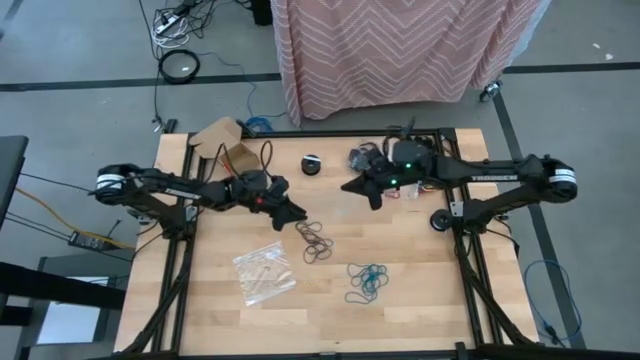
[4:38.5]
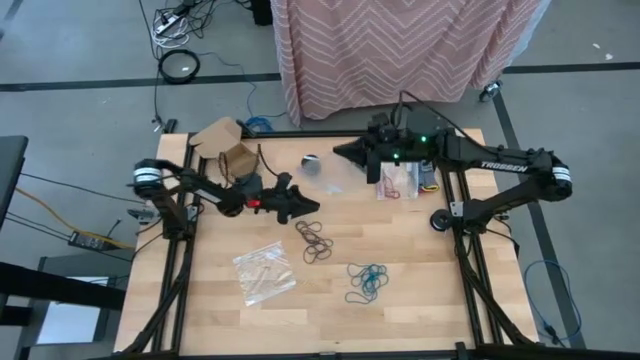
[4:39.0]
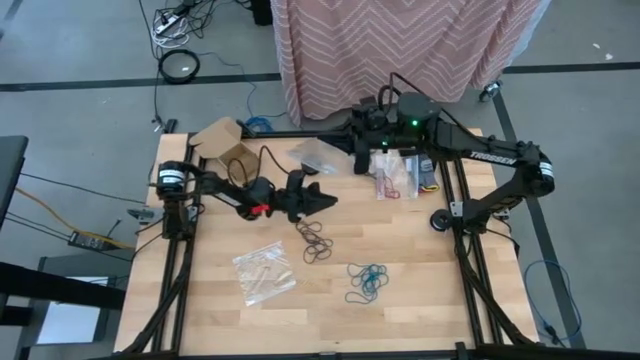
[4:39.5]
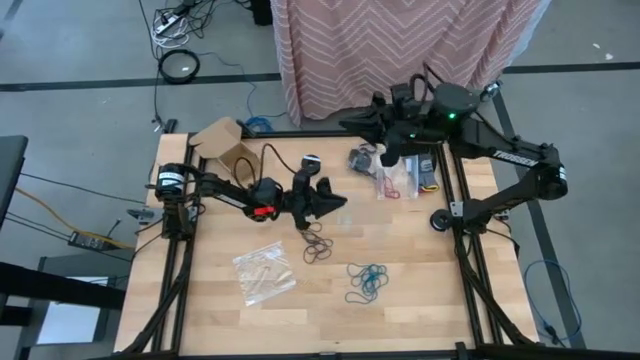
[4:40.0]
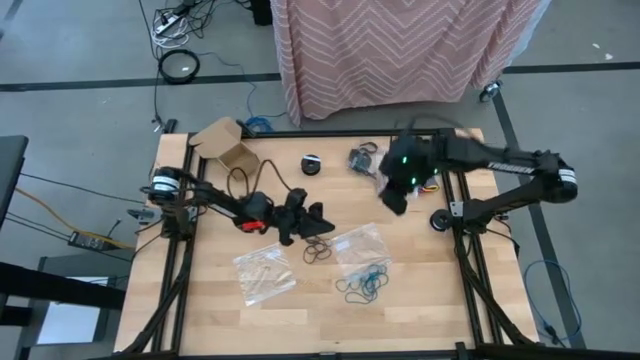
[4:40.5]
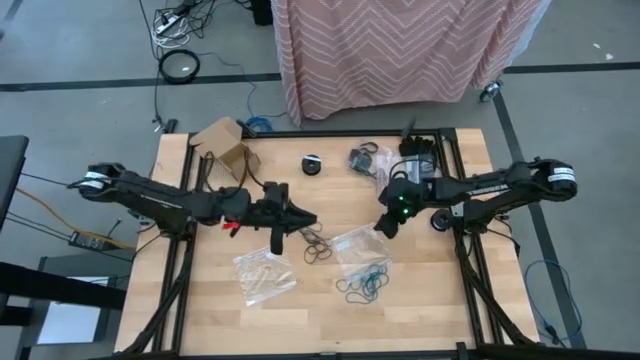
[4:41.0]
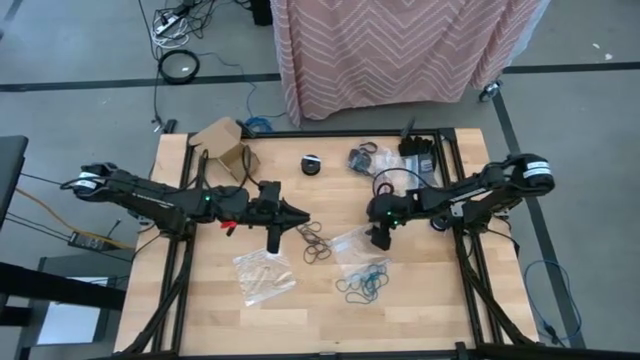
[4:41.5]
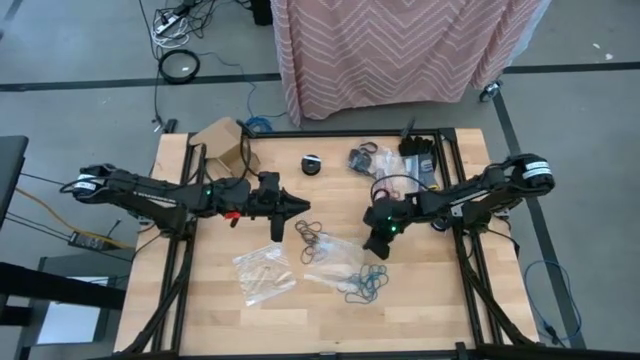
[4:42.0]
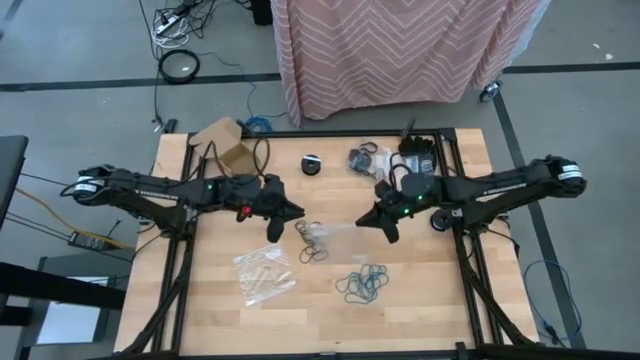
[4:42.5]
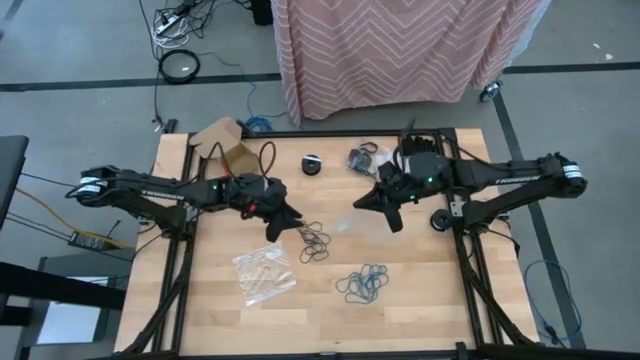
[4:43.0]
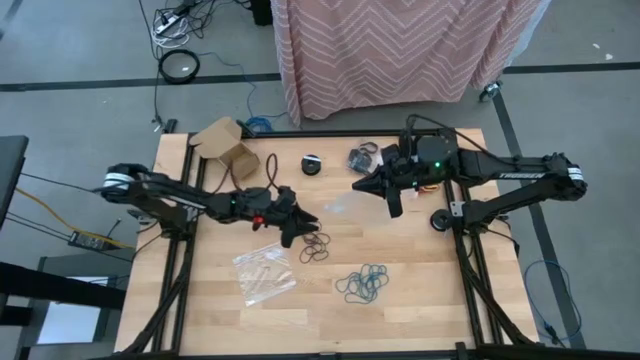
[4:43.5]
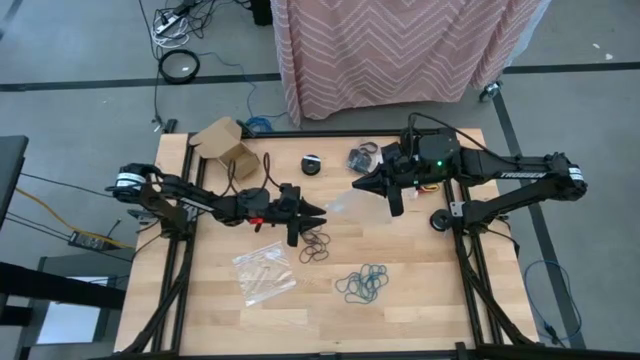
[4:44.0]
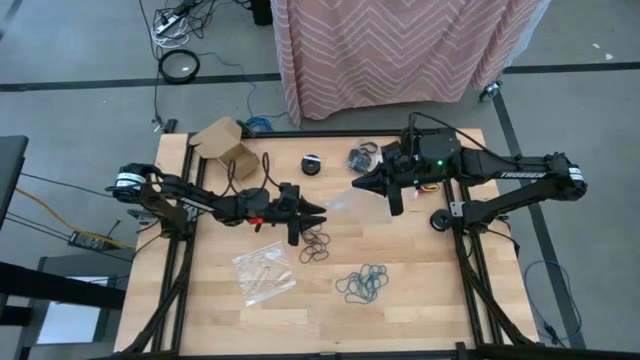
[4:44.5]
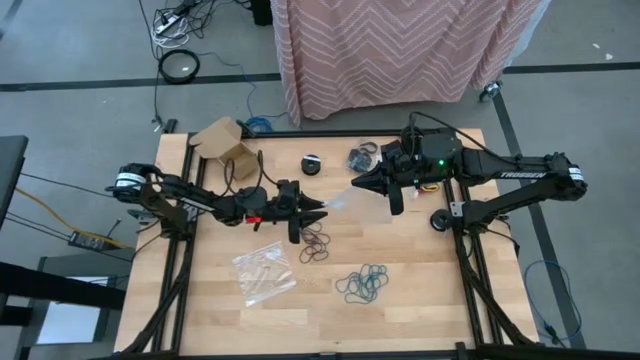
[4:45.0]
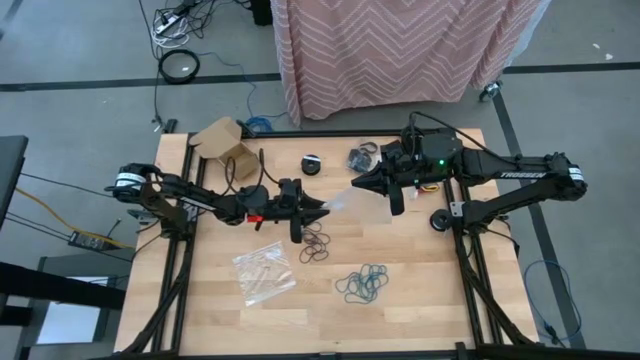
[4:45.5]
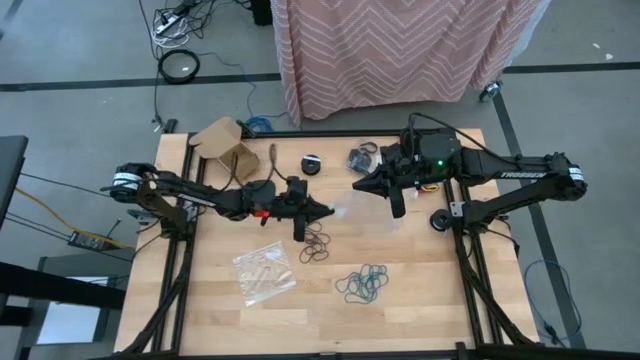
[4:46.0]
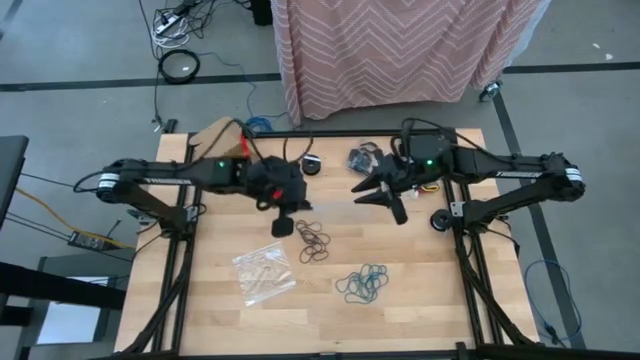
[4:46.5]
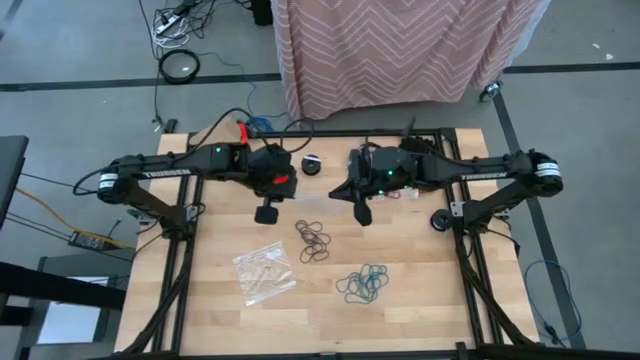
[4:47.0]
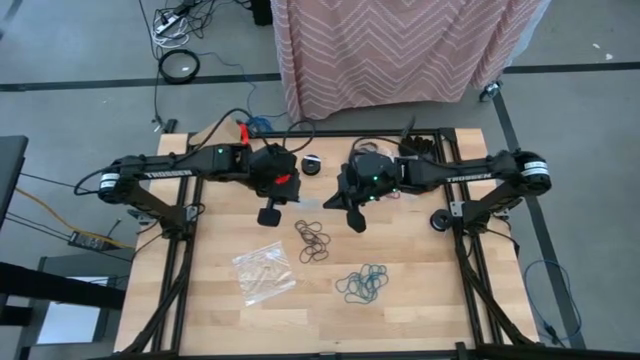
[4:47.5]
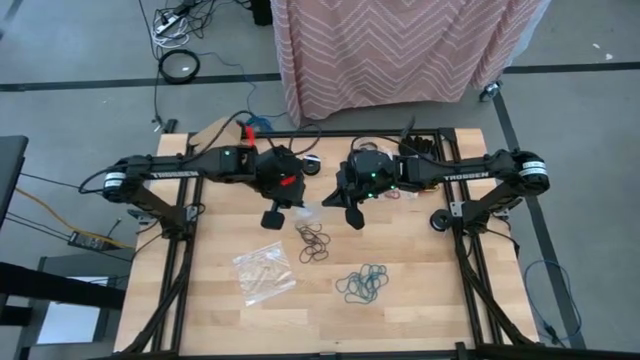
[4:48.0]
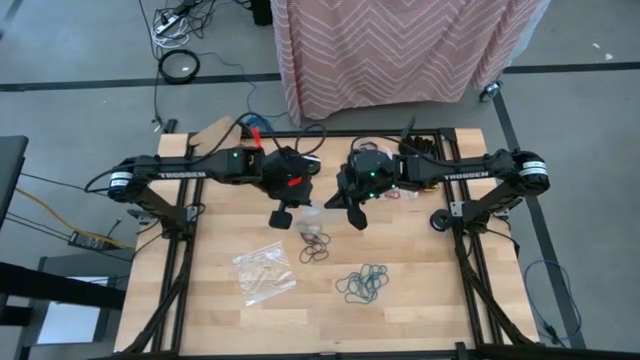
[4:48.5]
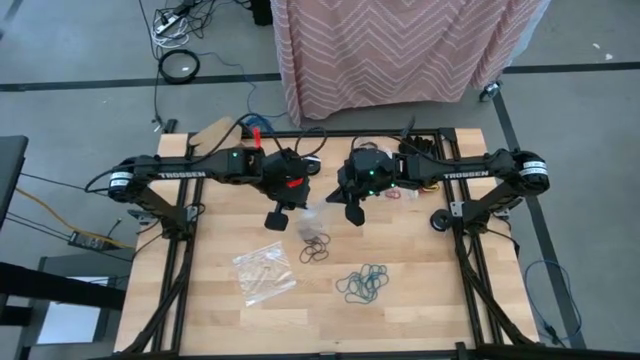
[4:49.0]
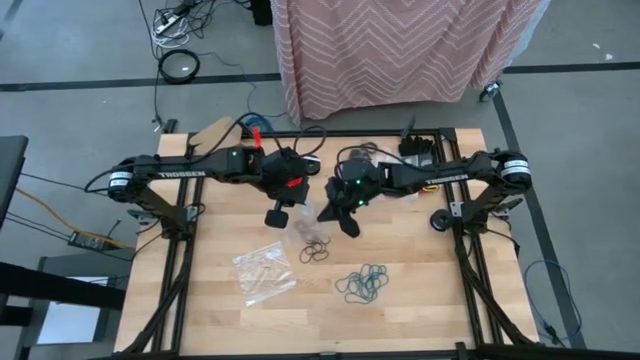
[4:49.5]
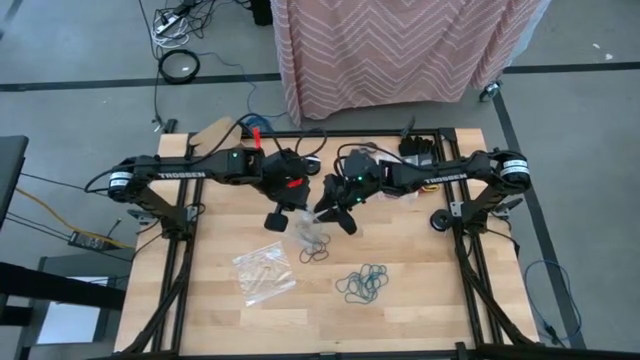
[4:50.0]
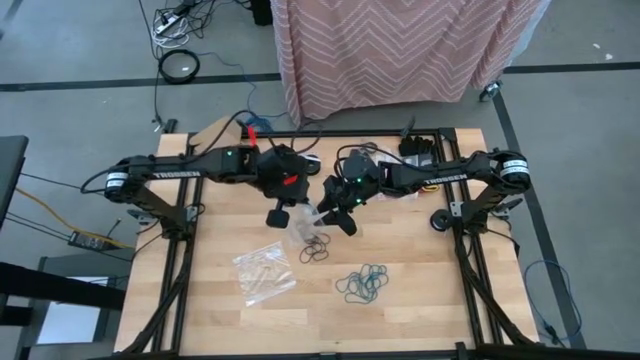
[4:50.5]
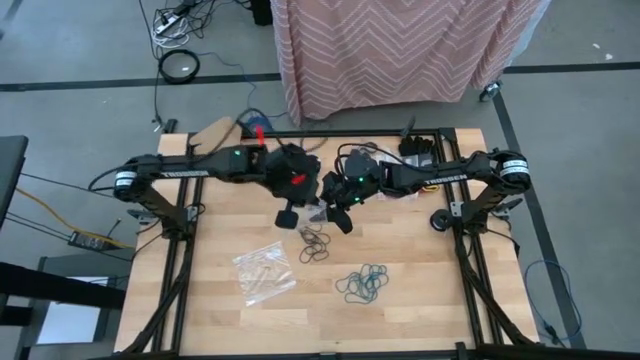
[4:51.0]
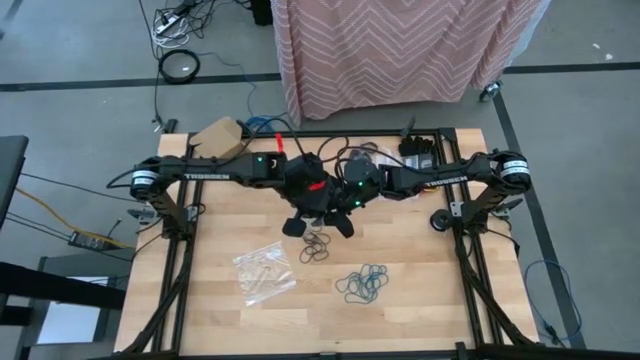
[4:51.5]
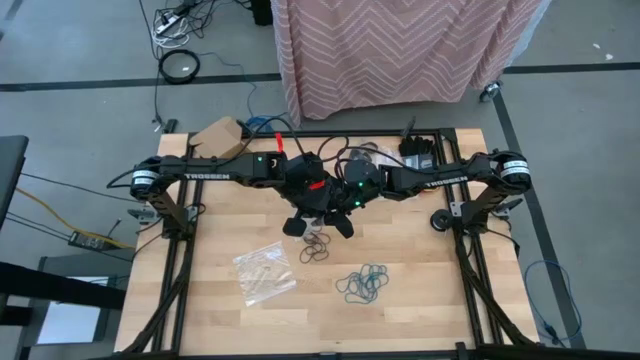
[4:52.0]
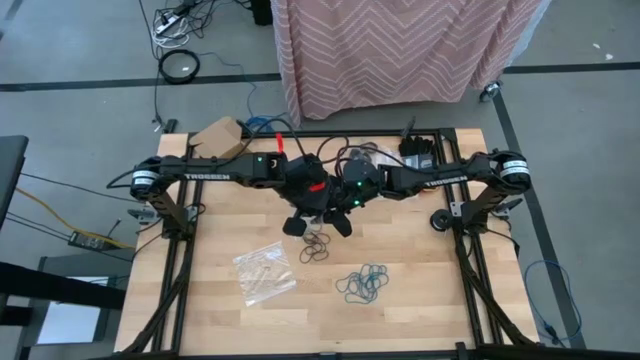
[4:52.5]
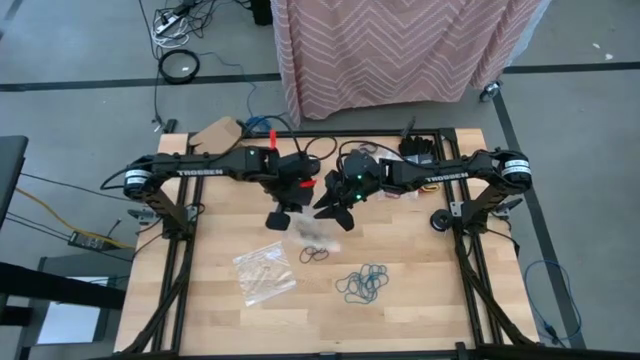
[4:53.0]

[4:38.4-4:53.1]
Task: Sort rubber bands
Open the transparent zip bag

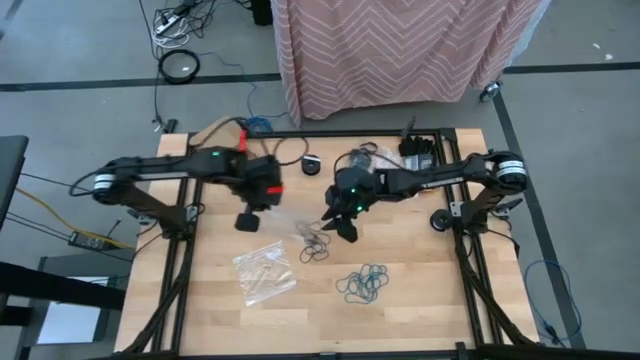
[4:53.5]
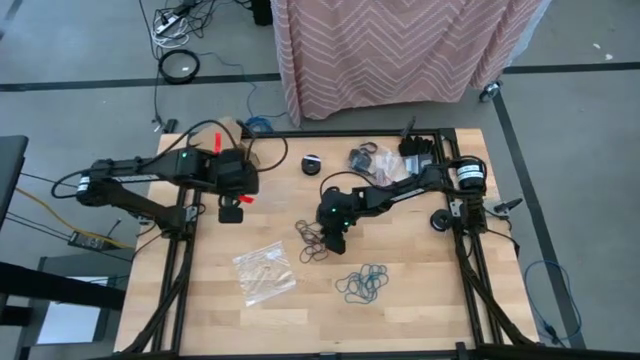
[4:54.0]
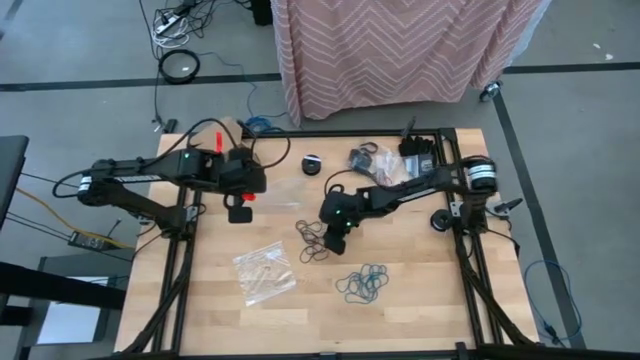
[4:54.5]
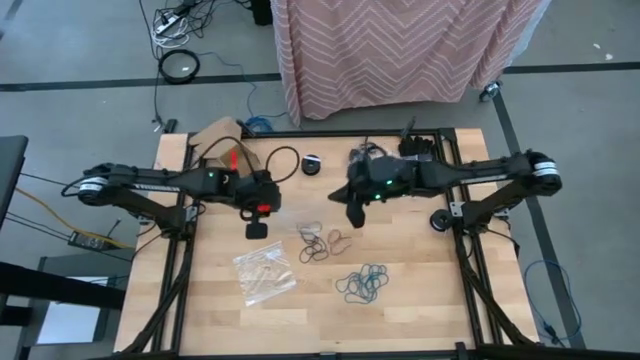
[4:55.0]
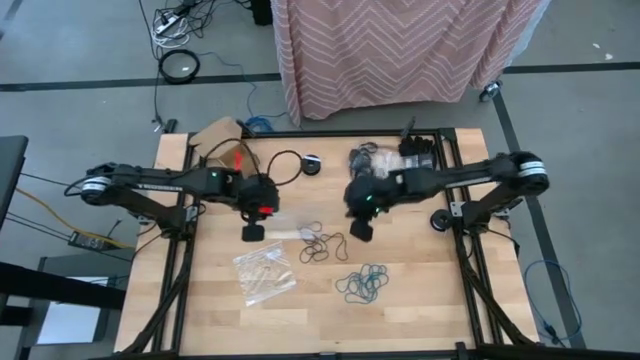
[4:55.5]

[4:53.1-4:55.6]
Put the violet rubber band into the transparent bag

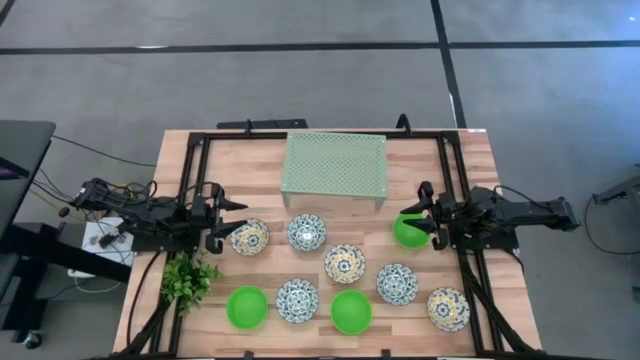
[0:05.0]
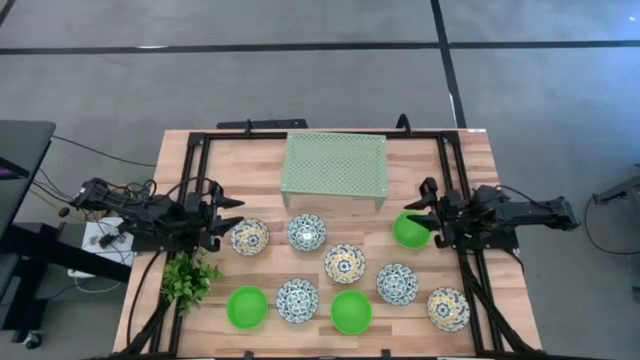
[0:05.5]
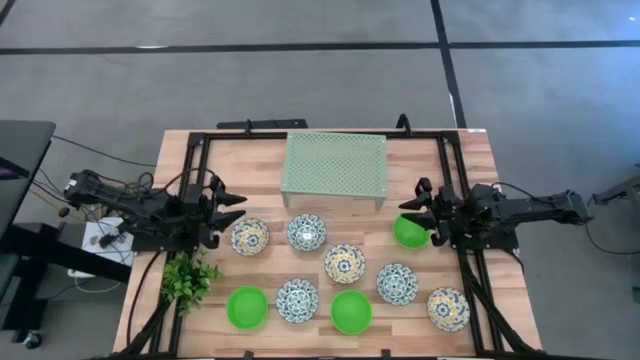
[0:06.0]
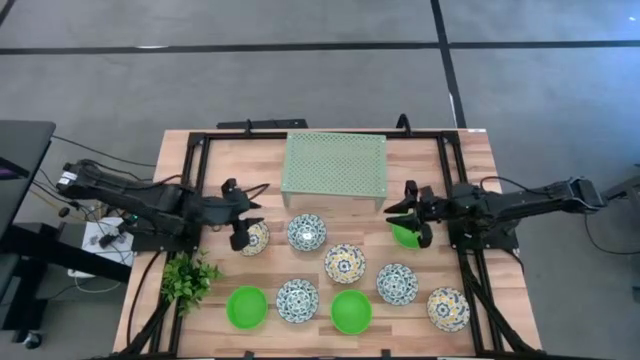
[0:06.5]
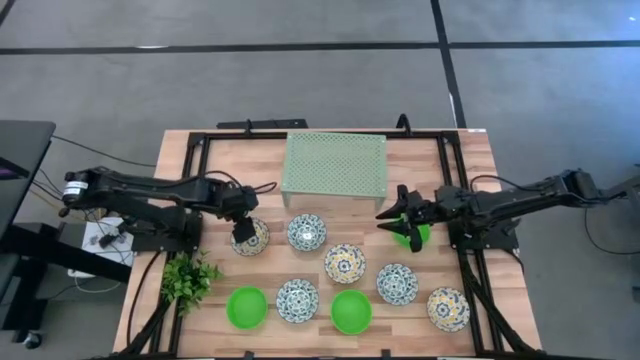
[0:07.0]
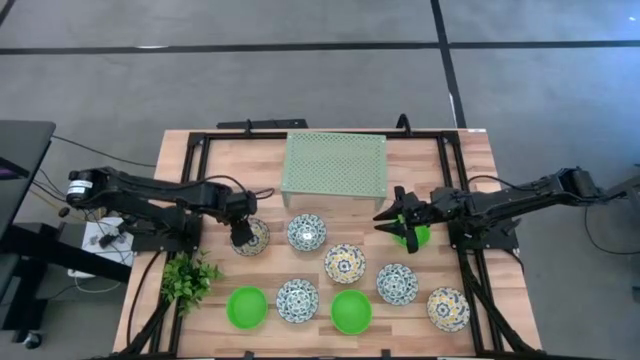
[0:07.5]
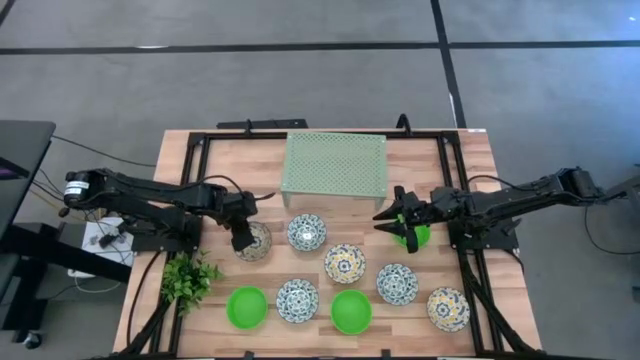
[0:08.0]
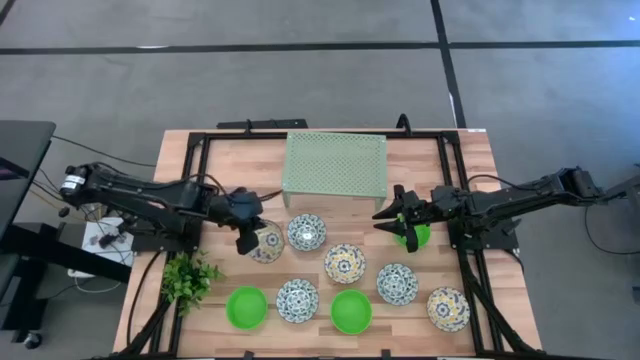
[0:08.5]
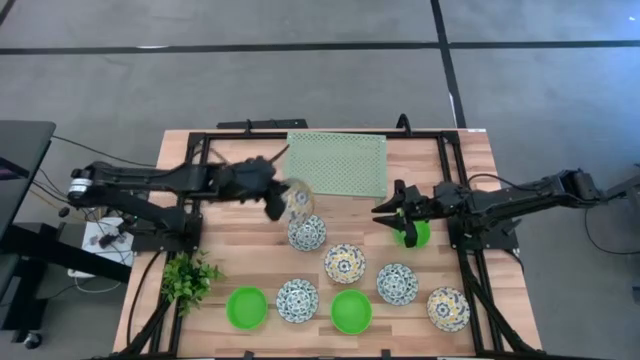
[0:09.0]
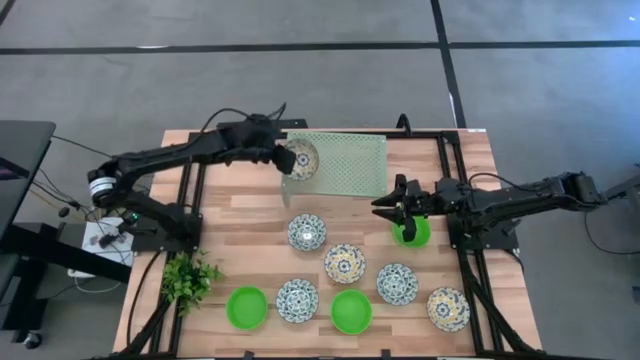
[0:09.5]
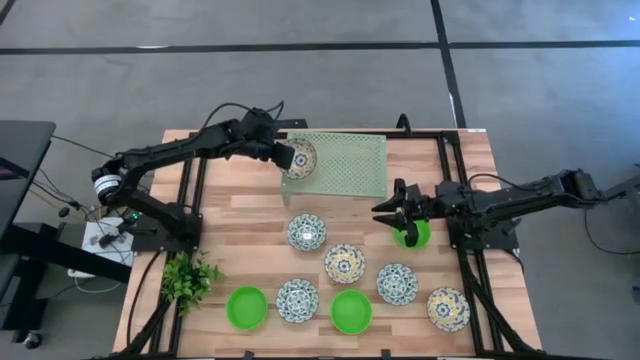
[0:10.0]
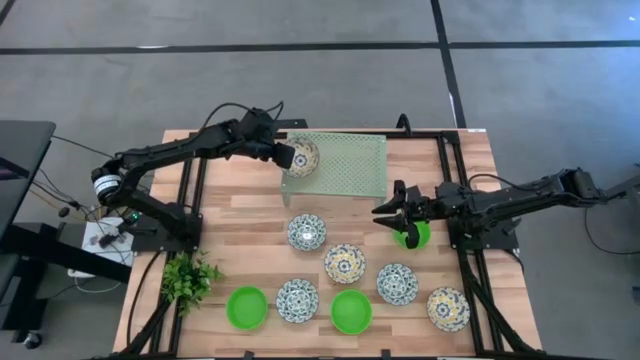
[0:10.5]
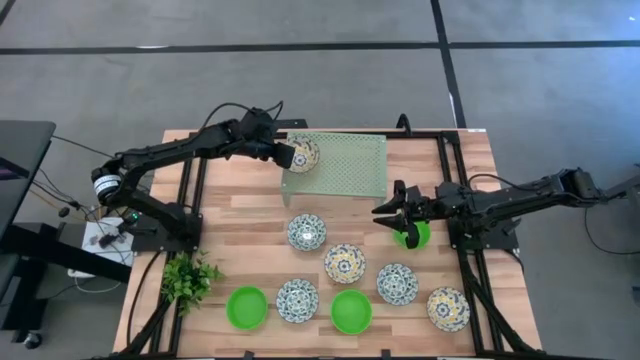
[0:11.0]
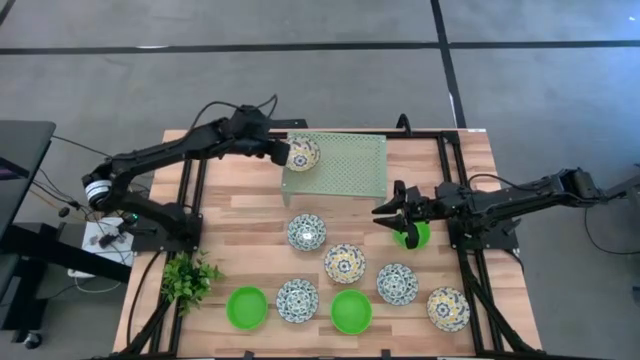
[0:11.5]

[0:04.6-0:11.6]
Task: Pick & Place Mini bowls
Put the top yellow patterned bowl on the shelf
